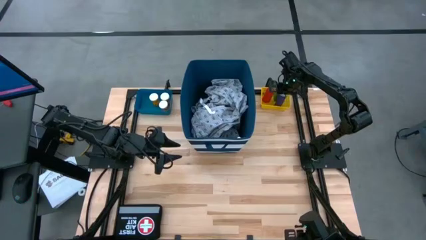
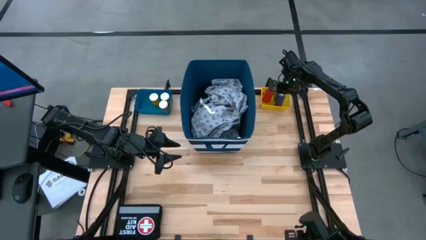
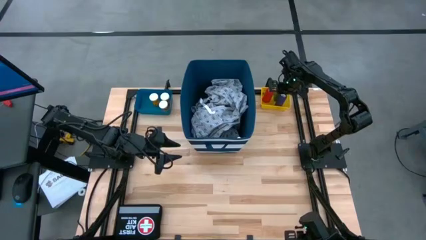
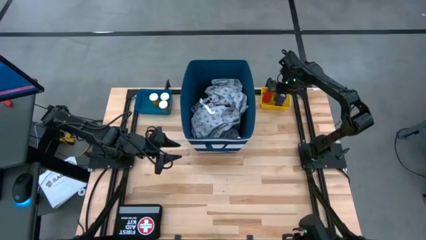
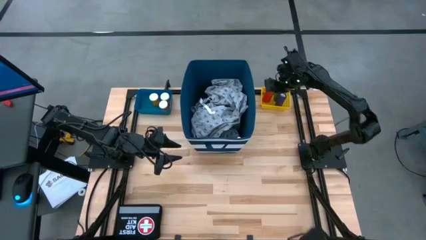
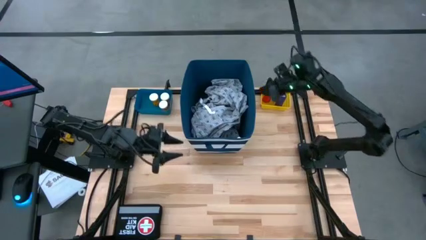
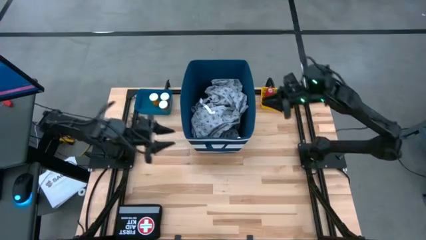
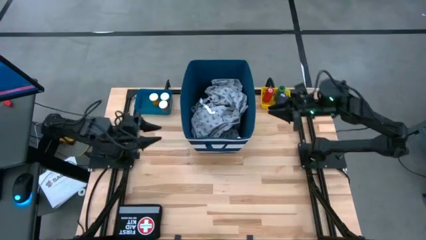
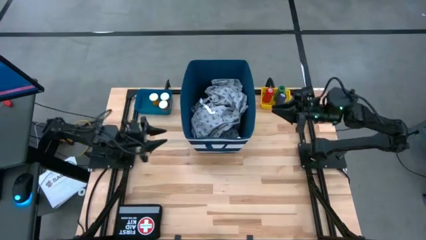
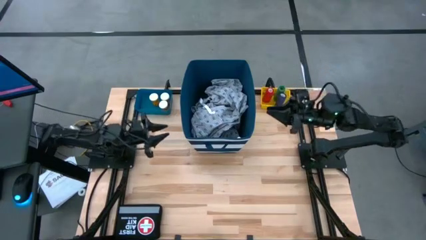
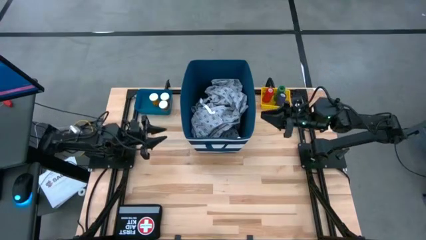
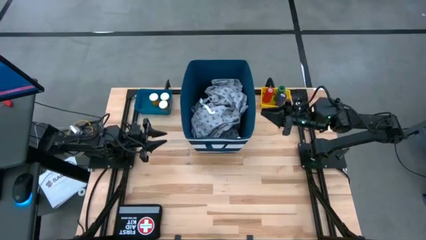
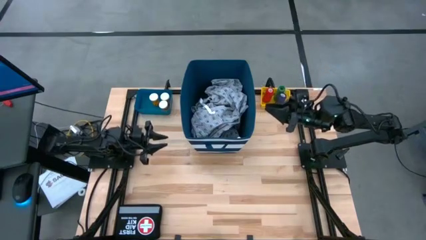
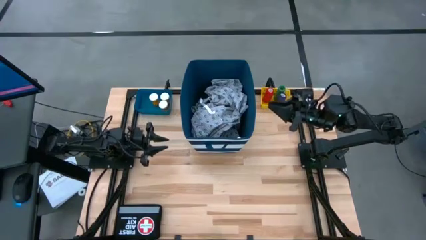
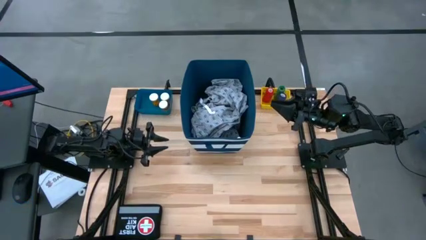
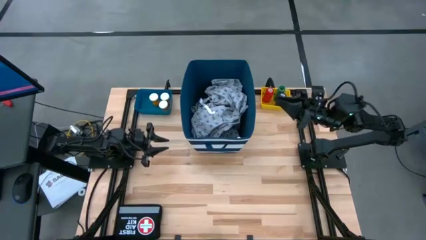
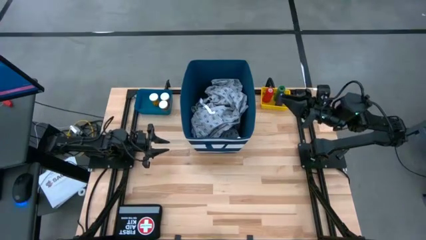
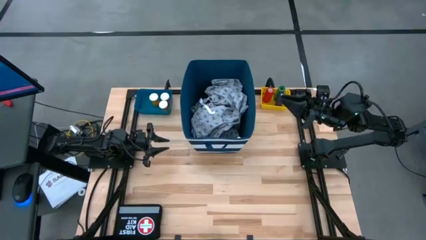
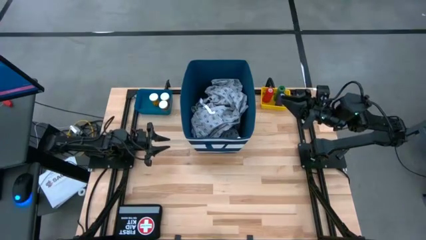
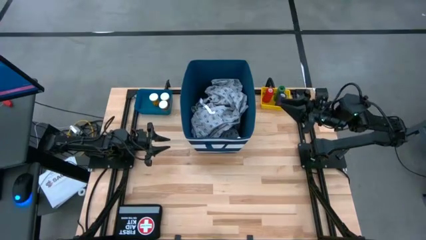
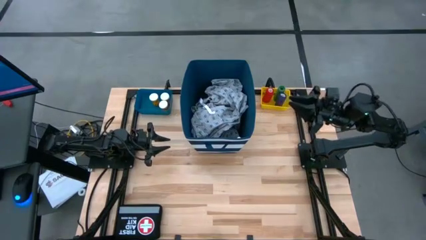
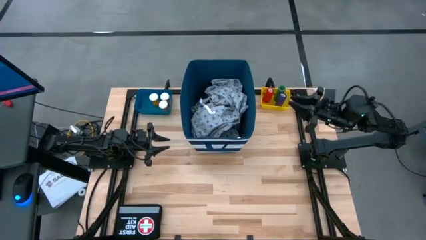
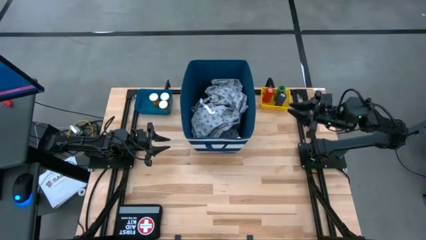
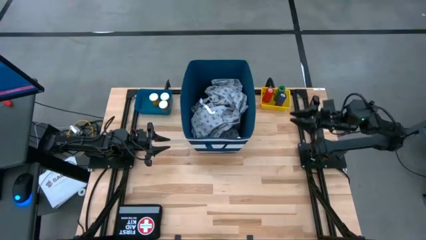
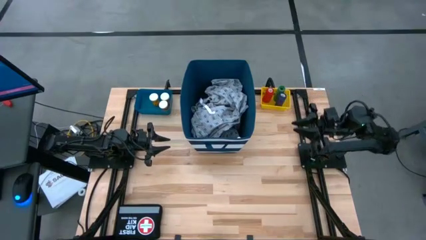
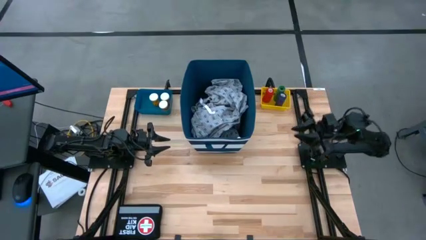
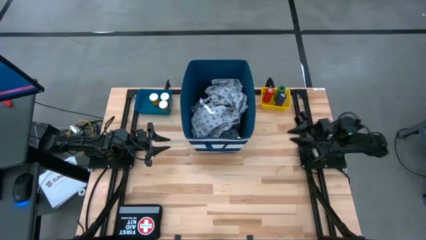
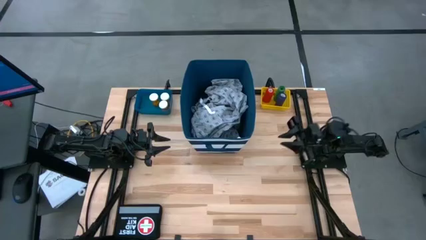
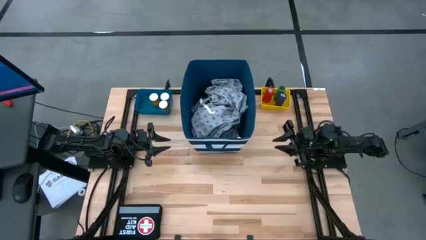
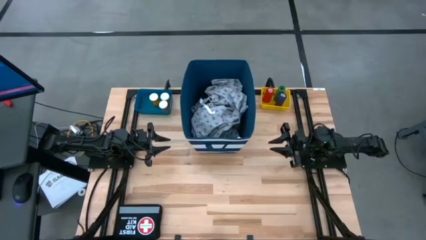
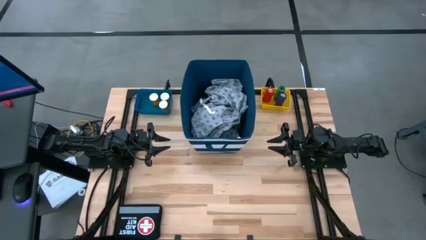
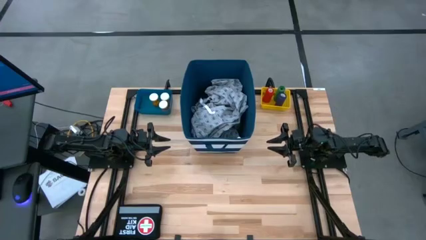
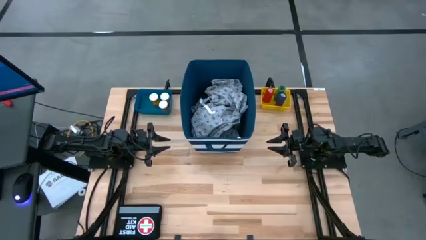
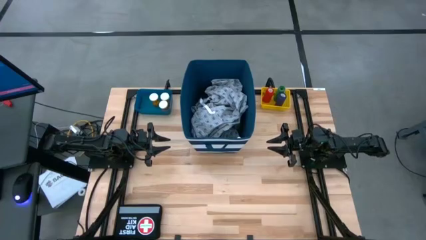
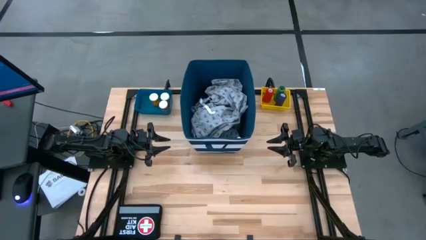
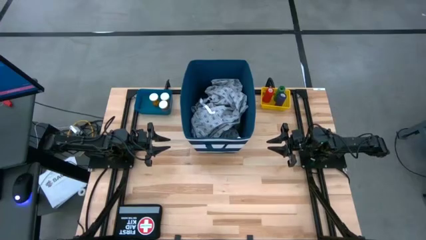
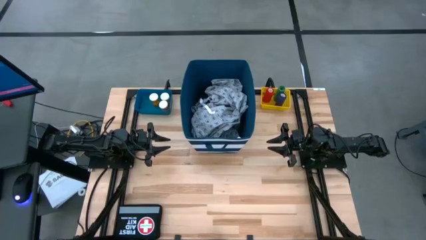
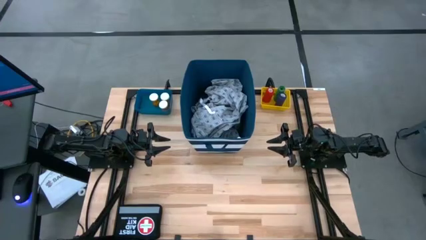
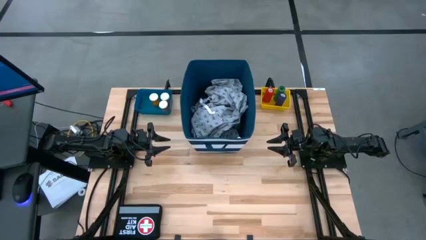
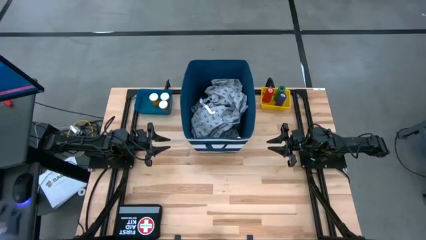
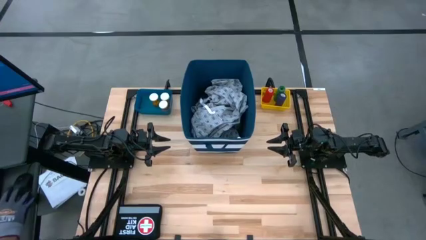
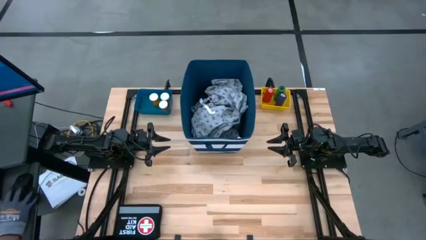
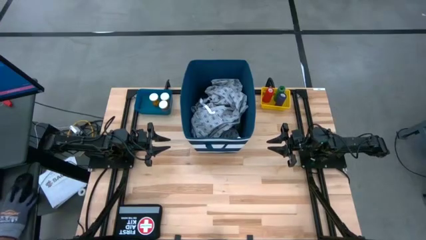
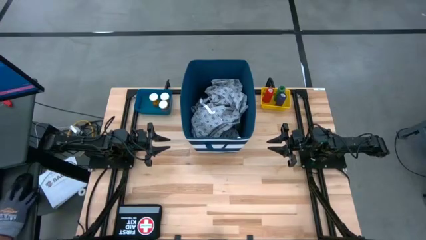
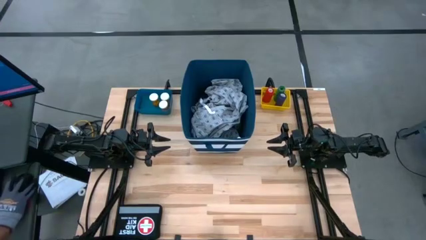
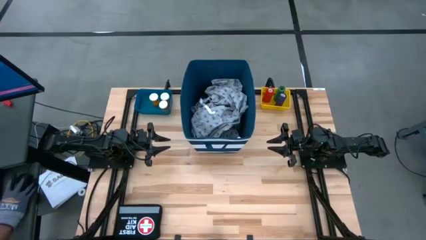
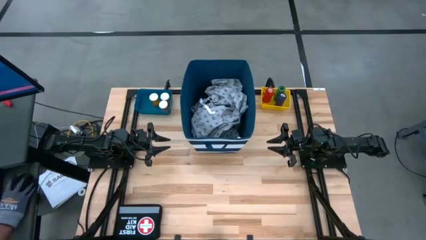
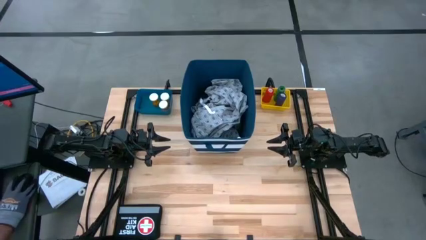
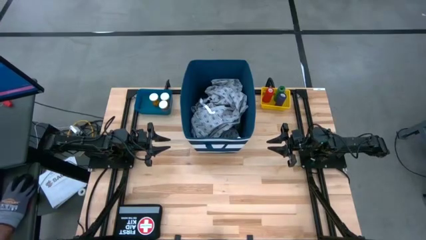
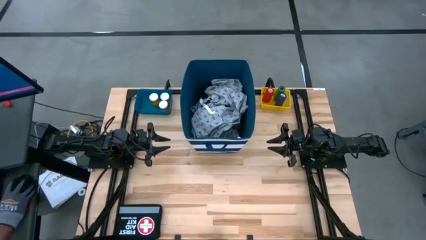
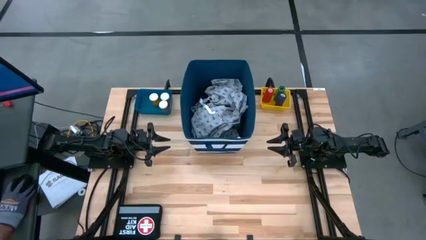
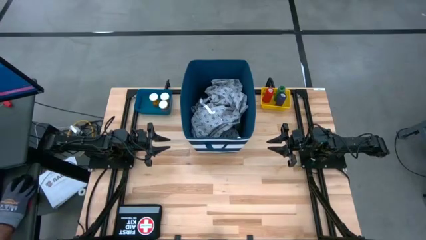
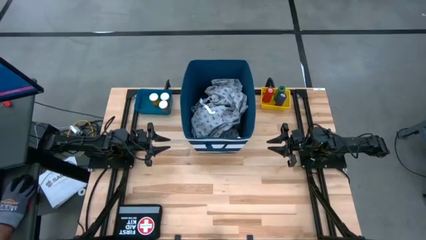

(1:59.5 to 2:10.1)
Task: Pick & place medical supplies in basket/bin
Return to Home Position
